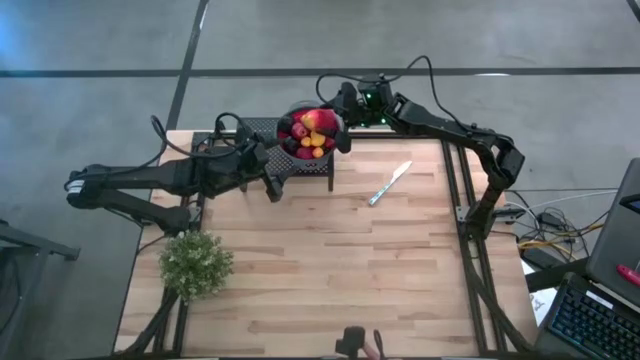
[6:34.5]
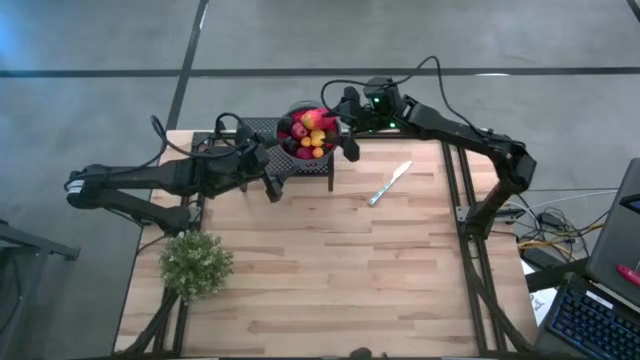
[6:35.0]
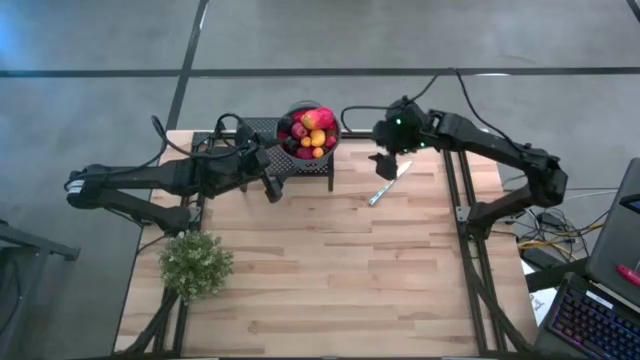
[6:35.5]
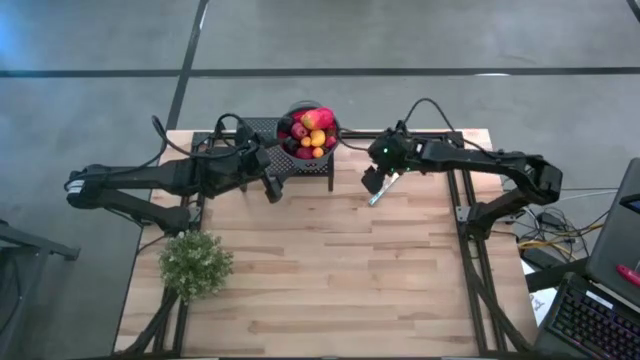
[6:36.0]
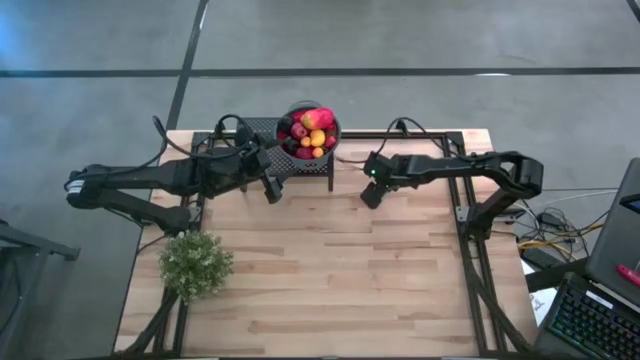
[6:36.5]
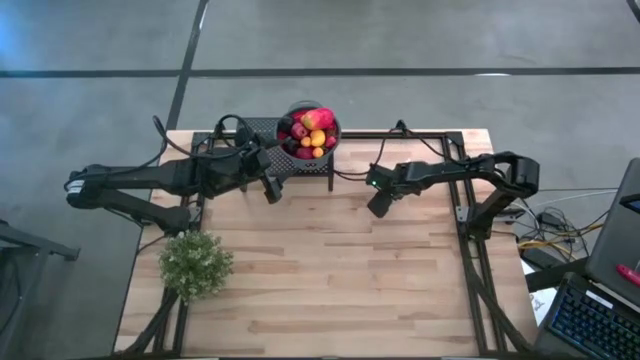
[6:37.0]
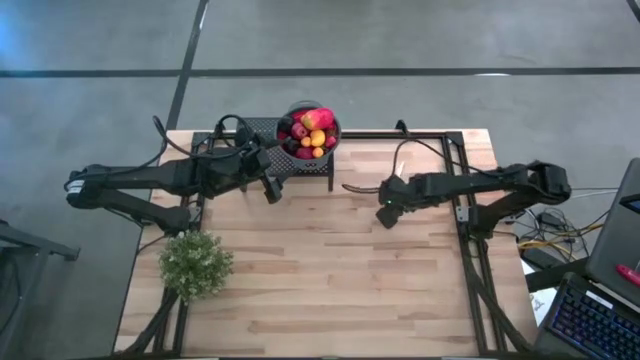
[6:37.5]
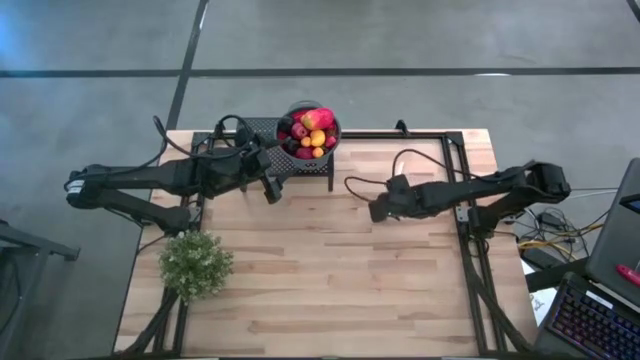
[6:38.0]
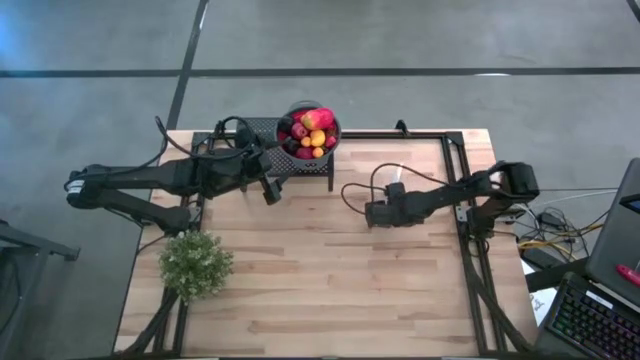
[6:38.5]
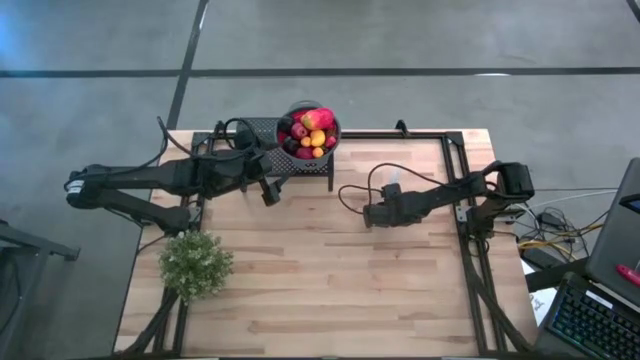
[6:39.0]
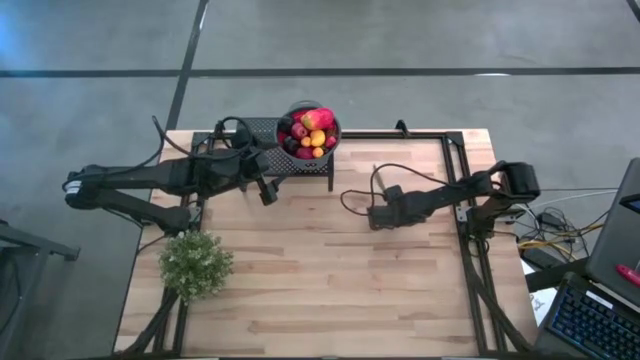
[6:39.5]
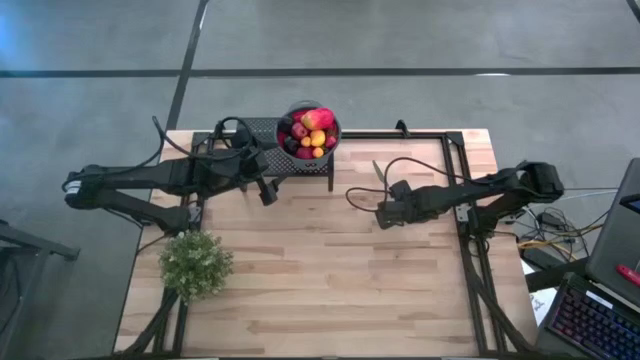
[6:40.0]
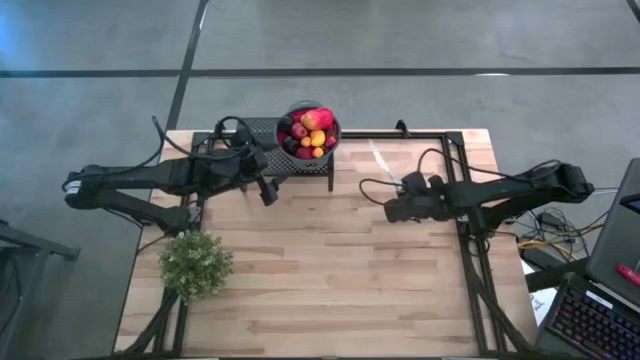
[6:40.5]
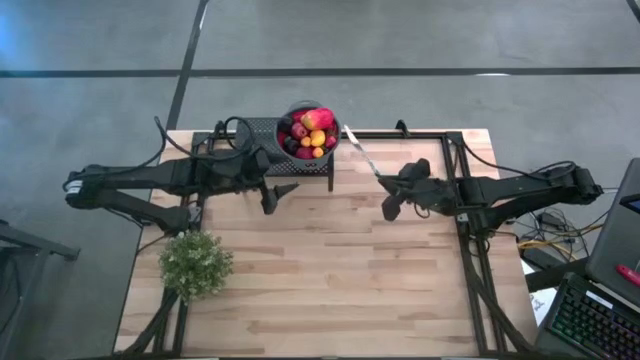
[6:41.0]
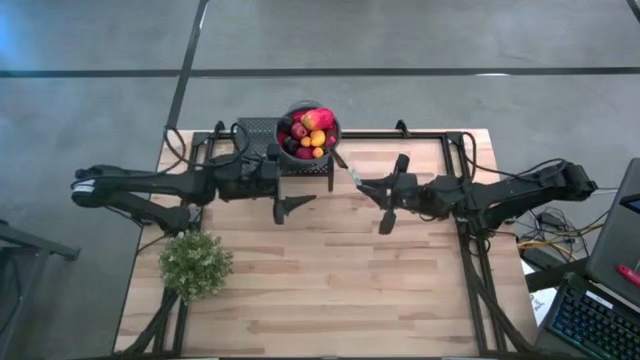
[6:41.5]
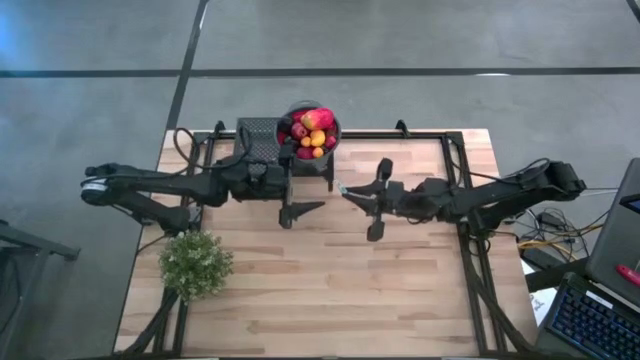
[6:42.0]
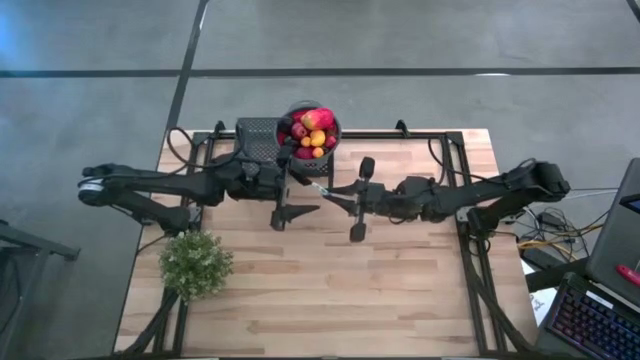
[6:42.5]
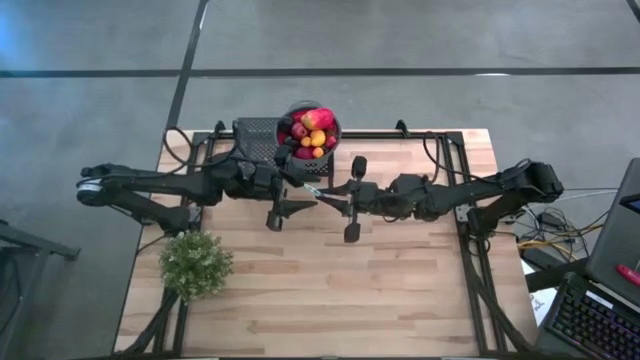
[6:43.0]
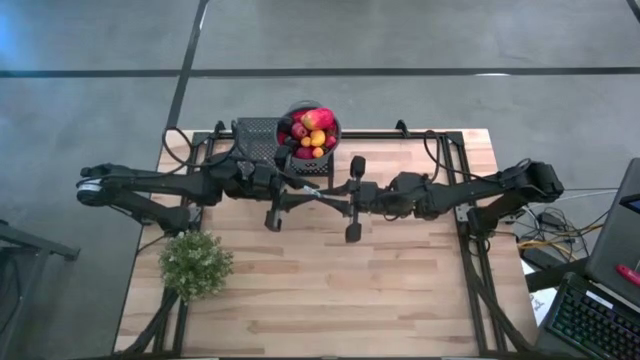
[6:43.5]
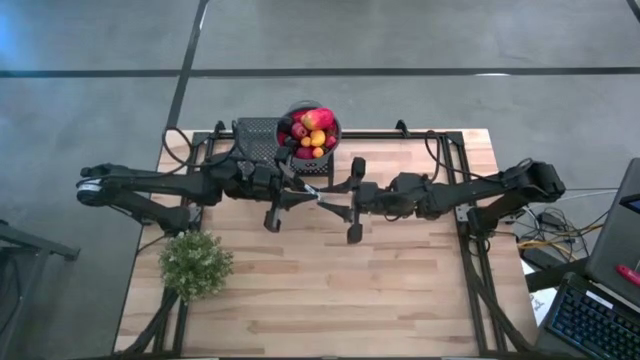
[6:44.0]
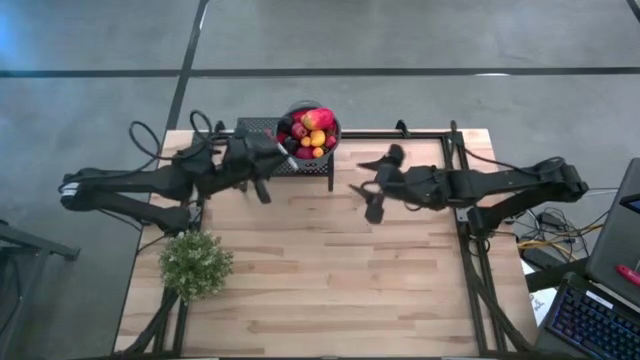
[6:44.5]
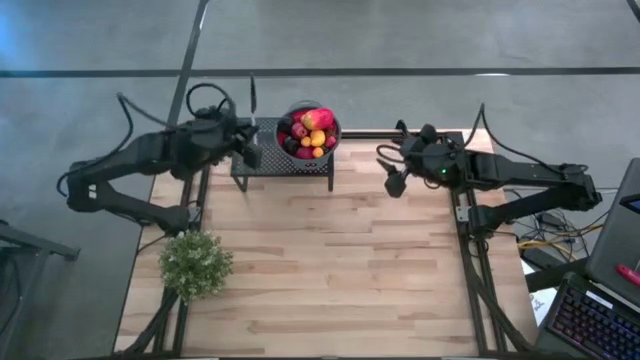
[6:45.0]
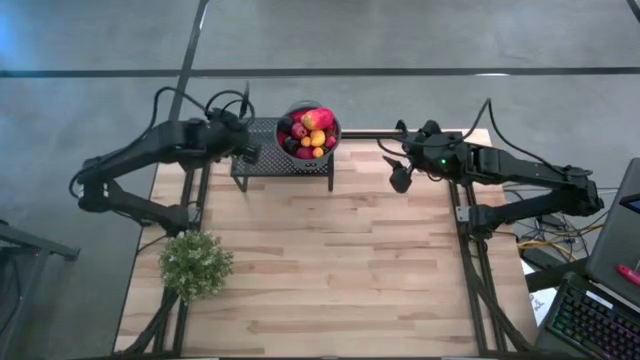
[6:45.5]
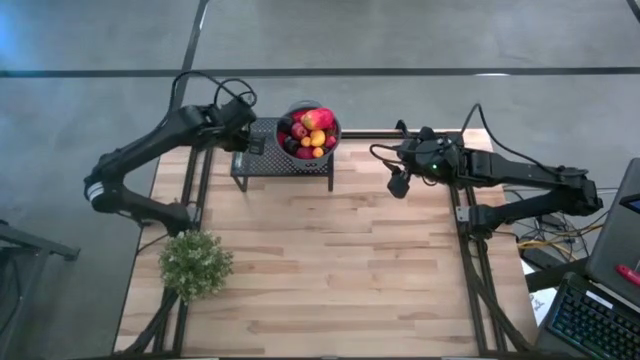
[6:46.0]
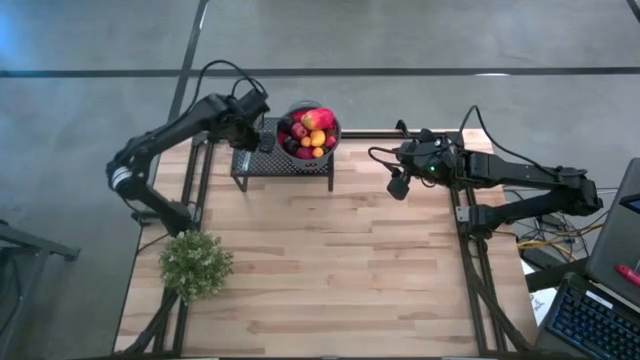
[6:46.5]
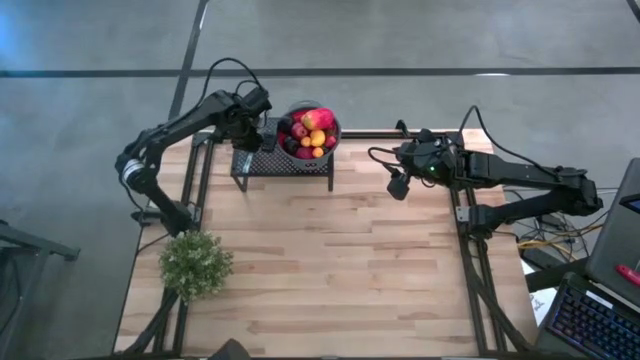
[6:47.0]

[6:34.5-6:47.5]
Task: Pick & Place Fruit
Put the blue table knife on the shelf

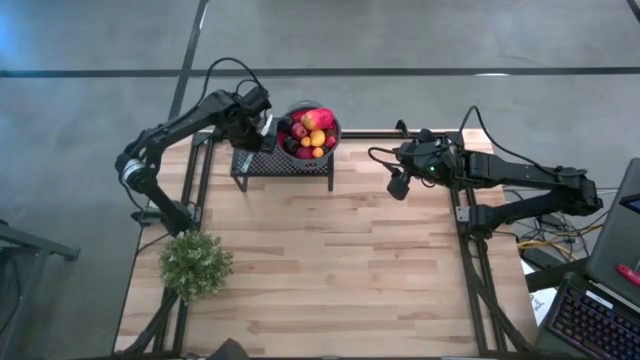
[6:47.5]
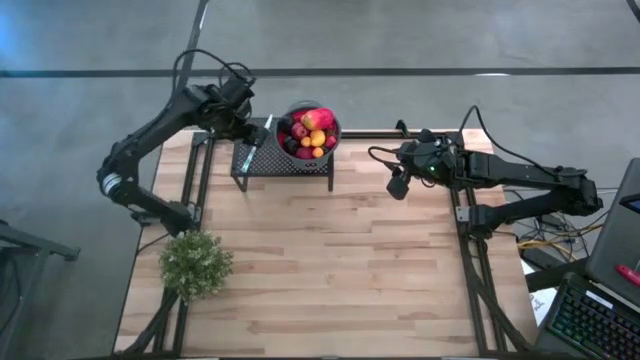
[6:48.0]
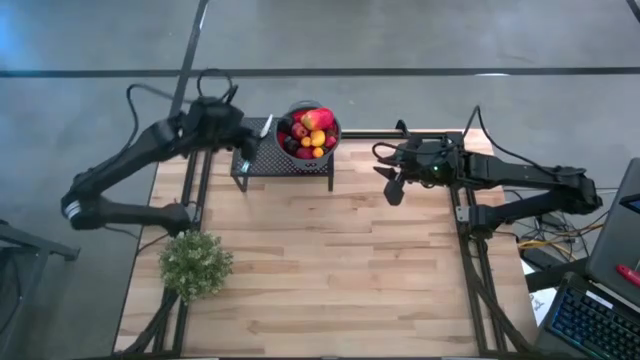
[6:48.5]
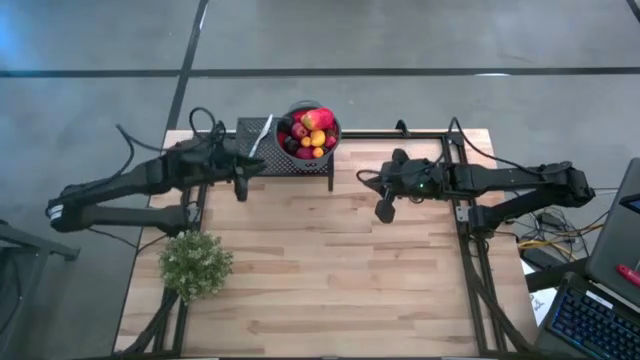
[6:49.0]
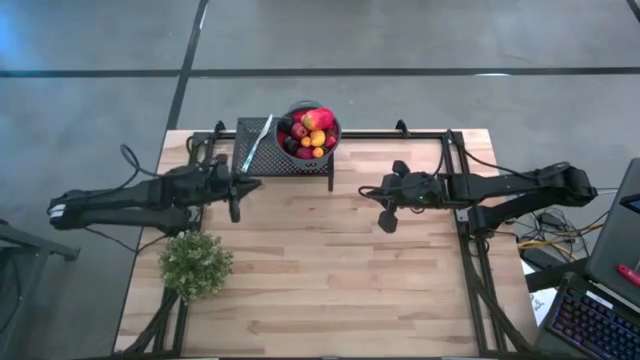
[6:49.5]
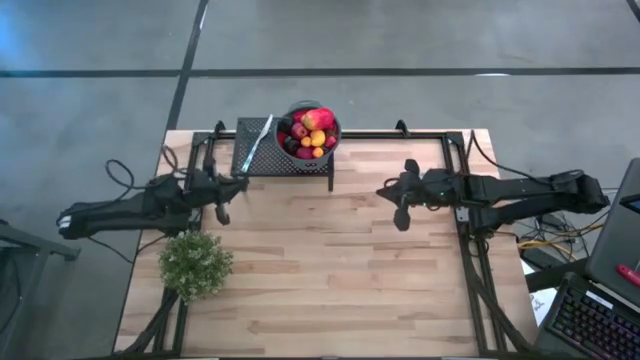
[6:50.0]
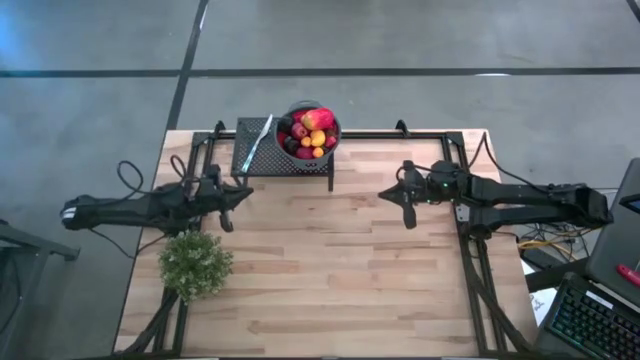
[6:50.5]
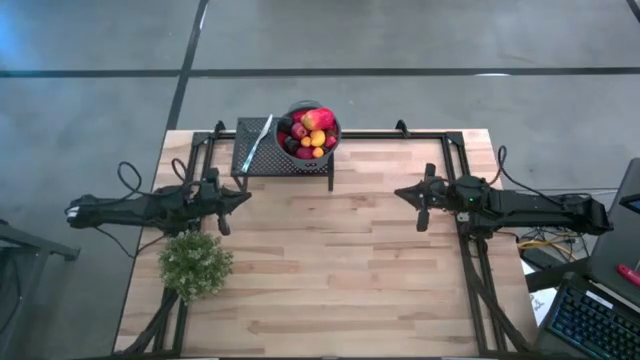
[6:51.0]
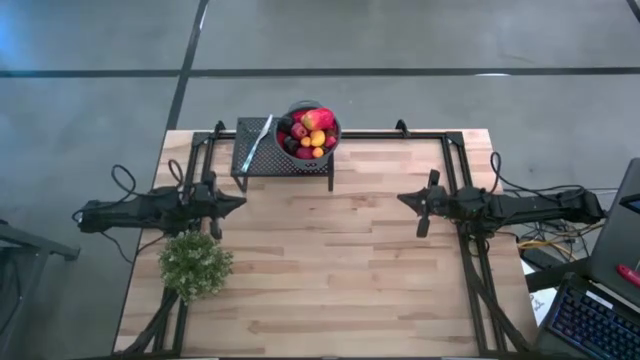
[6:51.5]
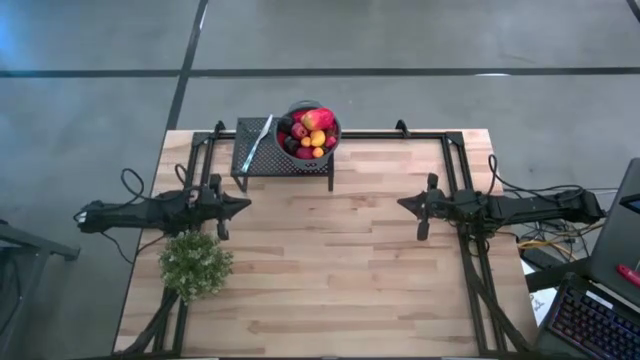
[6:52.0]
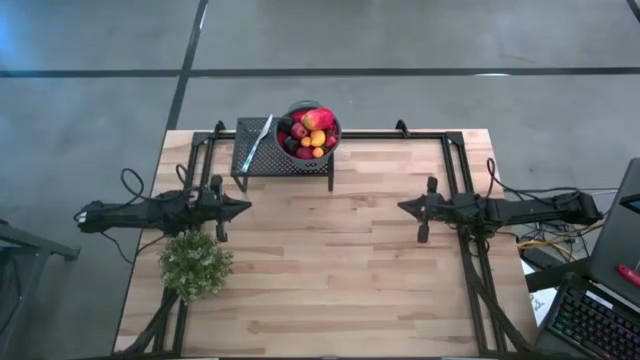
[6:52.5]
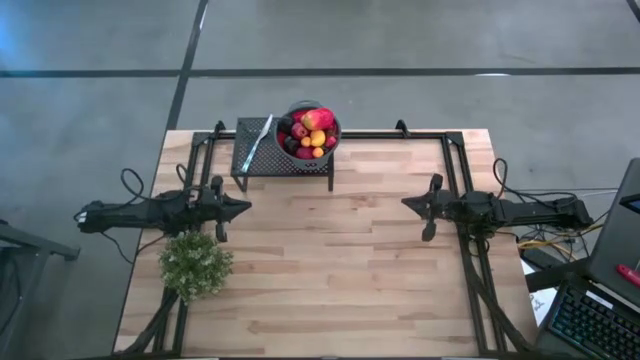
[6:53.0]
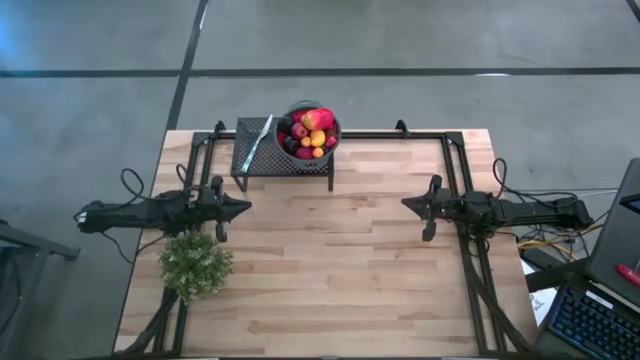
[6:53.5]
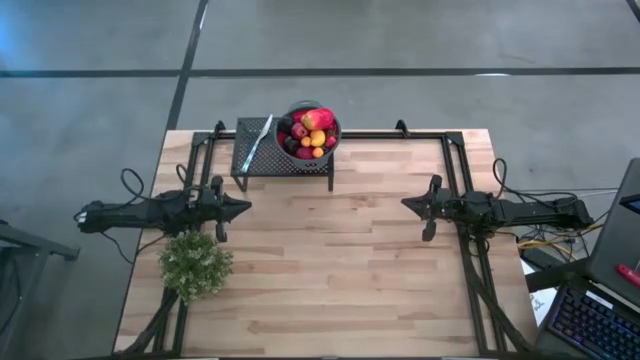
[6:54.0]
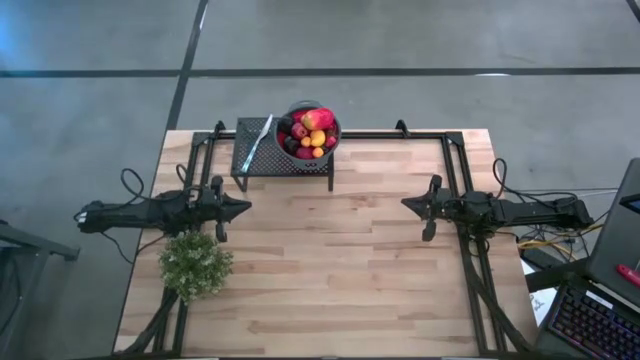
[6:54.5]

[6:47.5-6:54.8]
Return to Home Position
